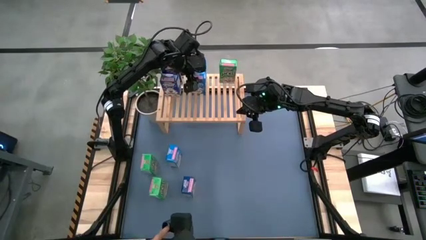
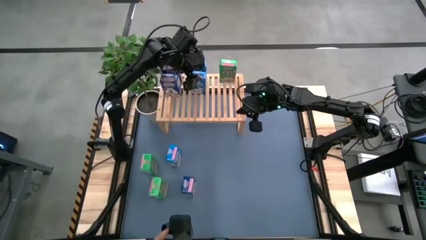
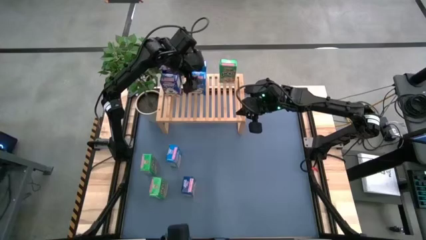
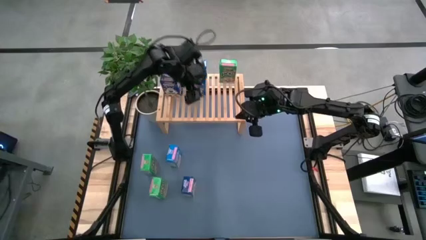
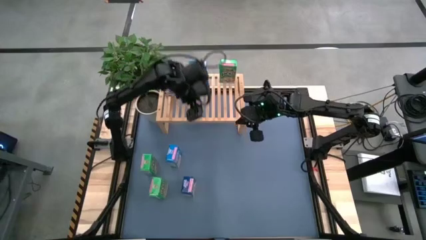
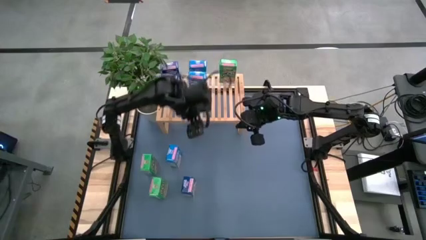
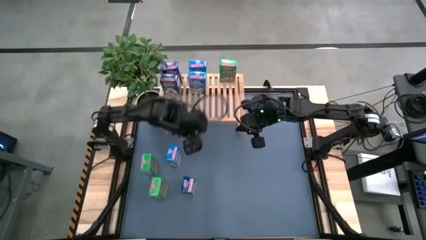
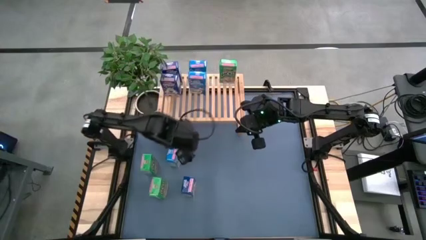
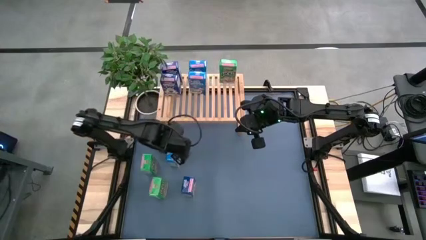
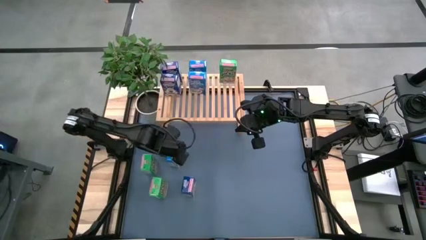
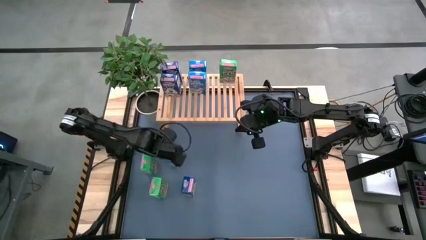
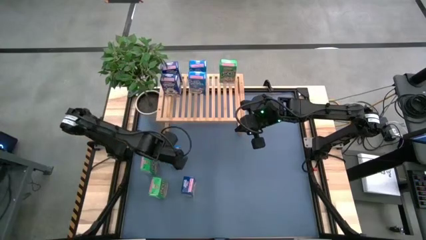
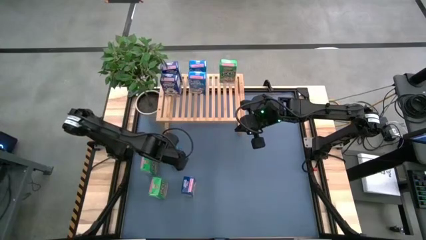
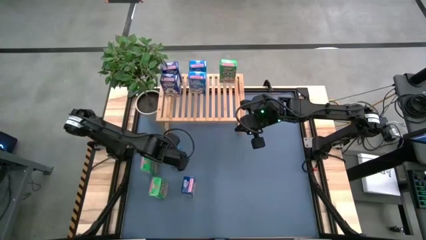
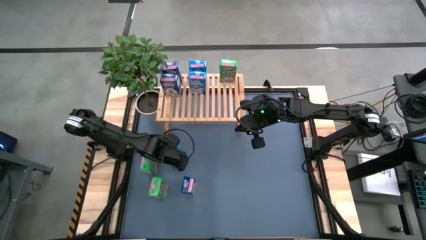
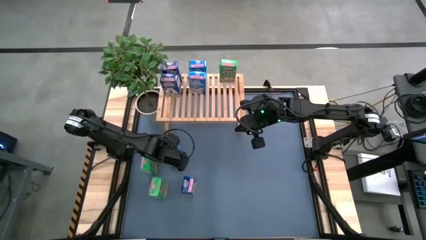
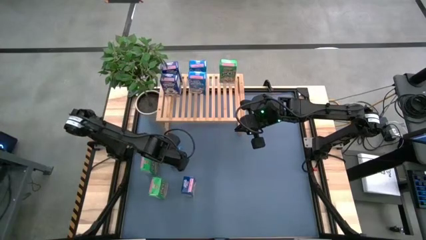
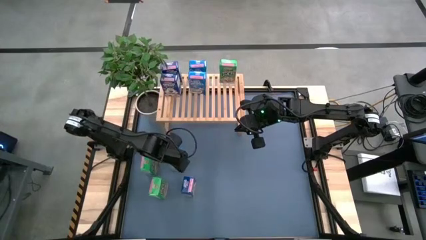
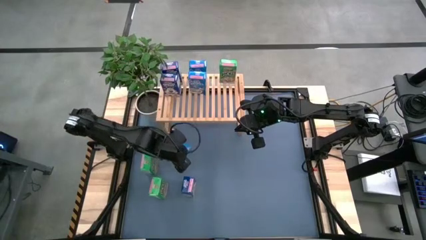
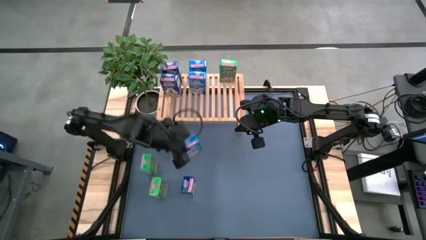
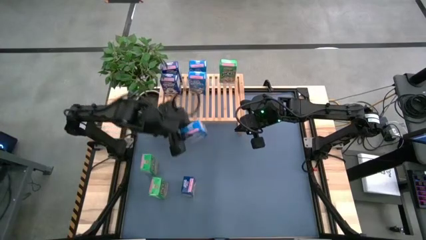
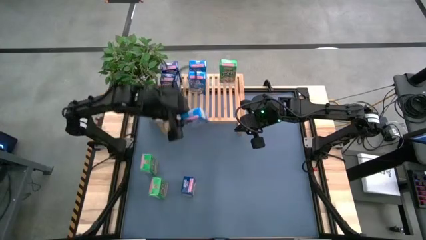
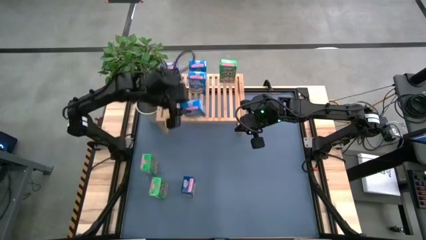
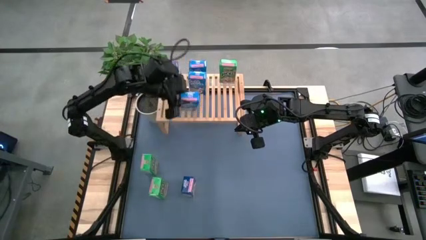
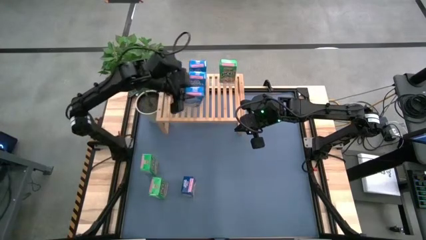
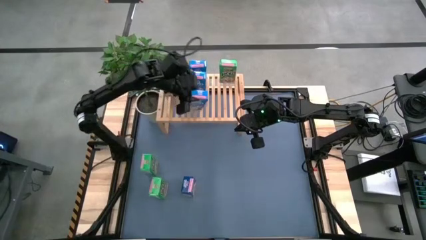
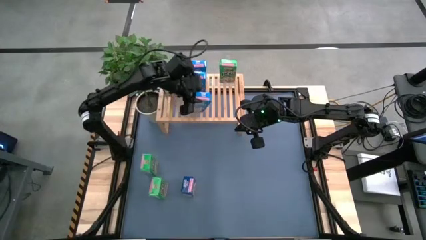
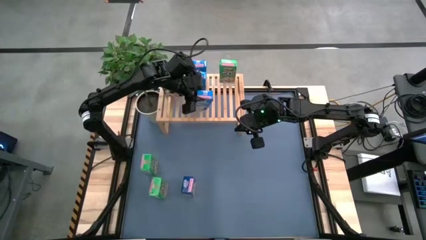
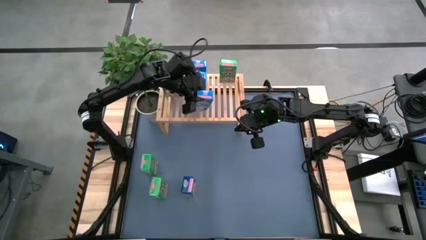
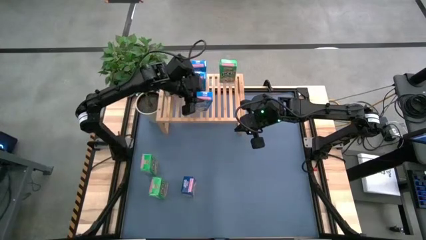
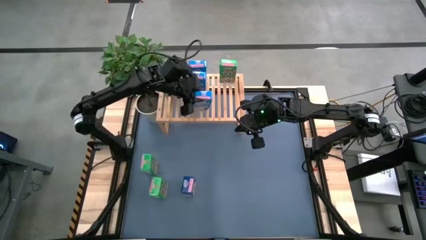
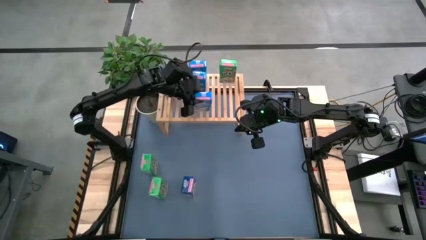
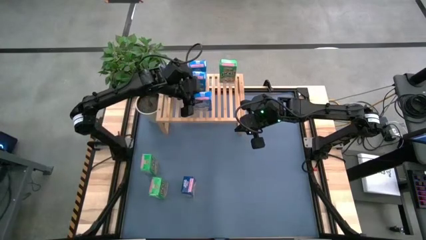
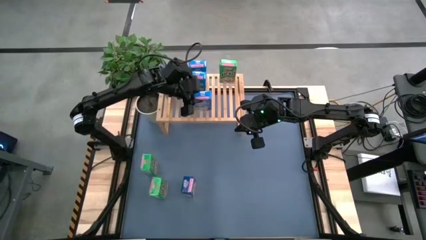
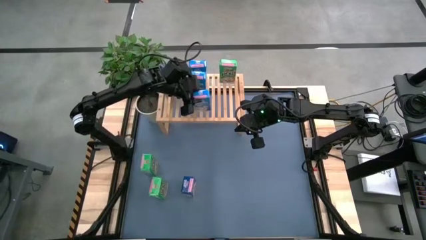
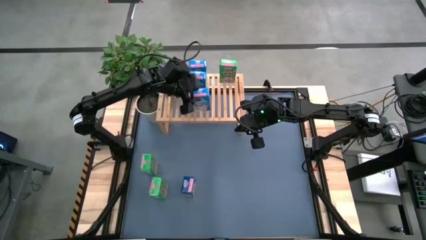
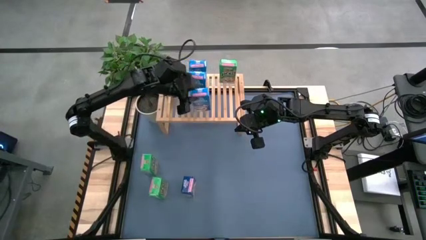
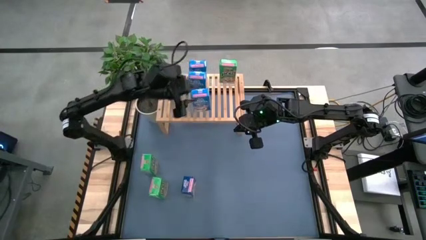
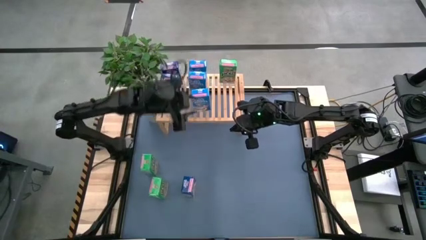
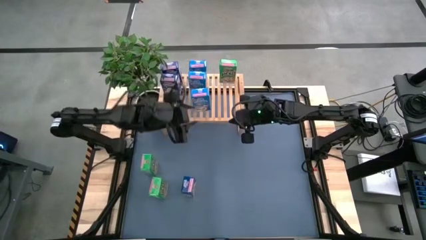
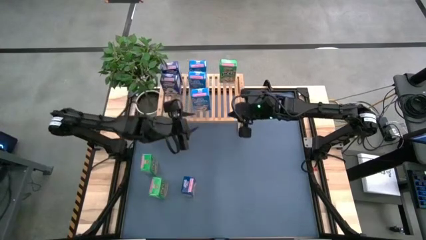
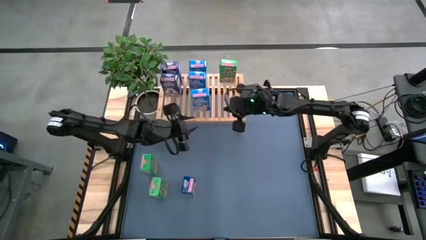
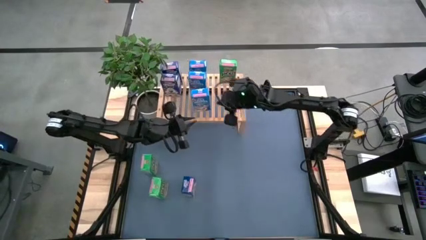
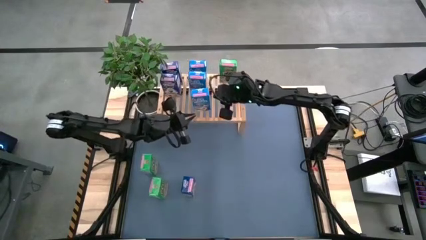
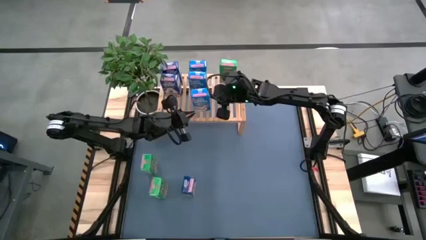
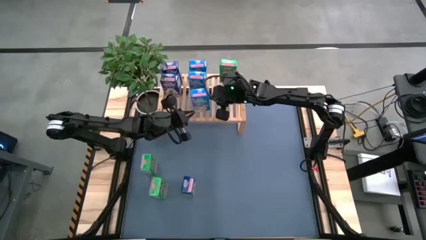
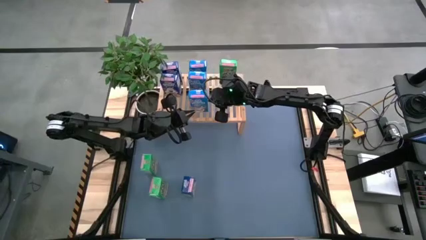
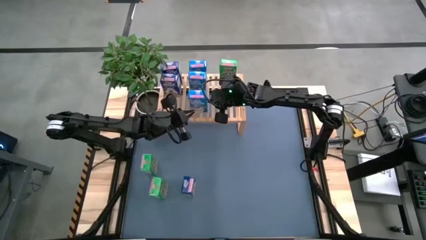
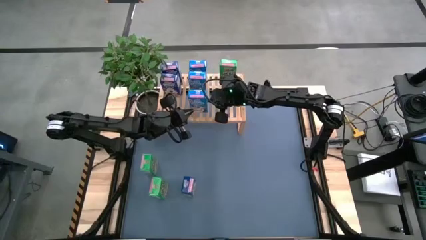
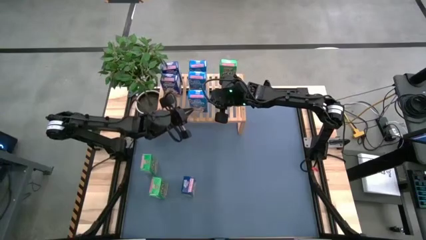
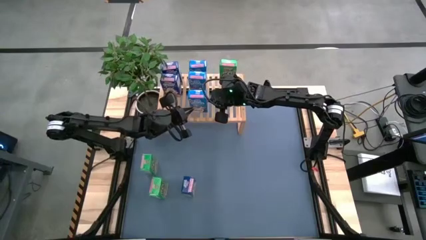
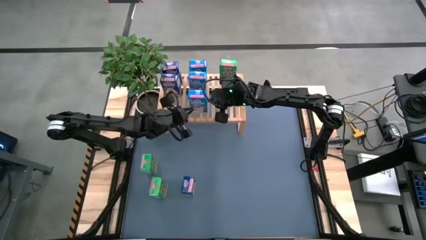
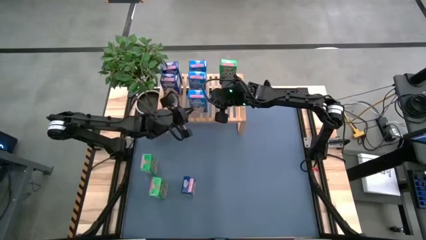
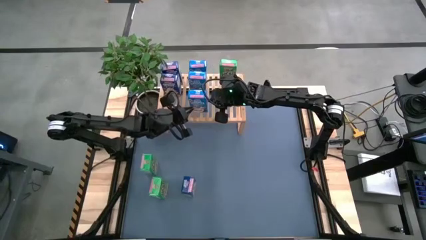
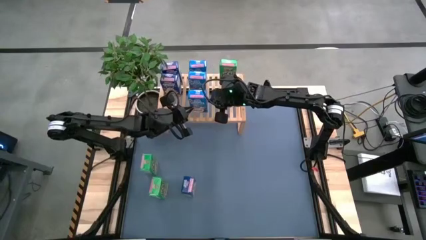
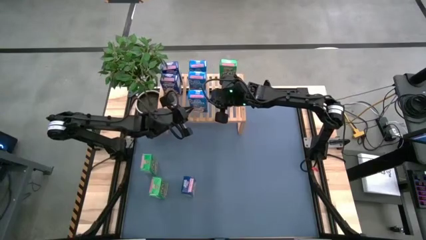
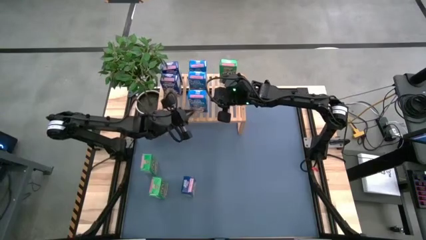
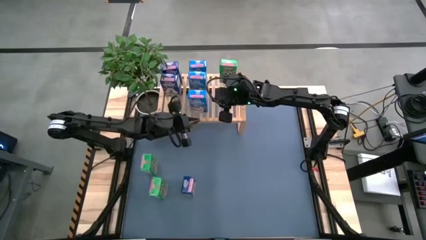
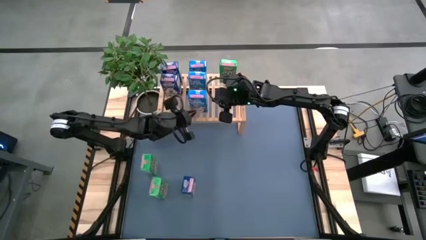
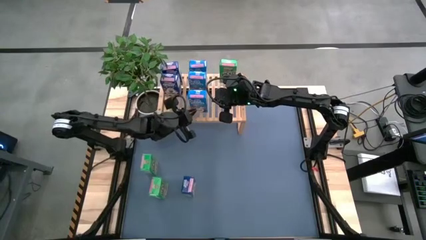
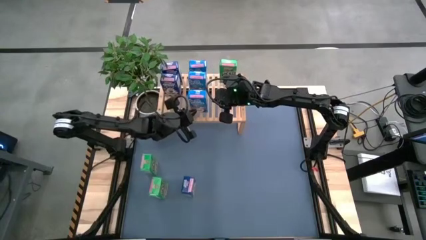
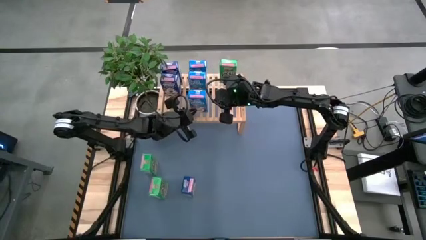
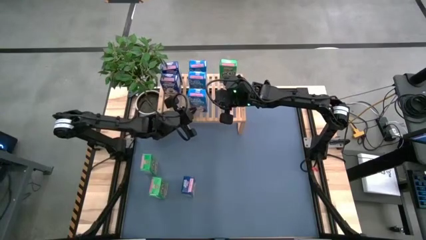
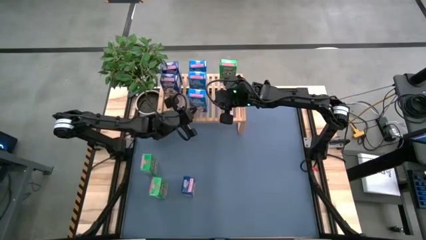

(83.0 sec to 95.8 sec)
Task: Stack cereal on shelf
Put the light blue cereal box on the shelf aligned with the light blue cereal boxes
